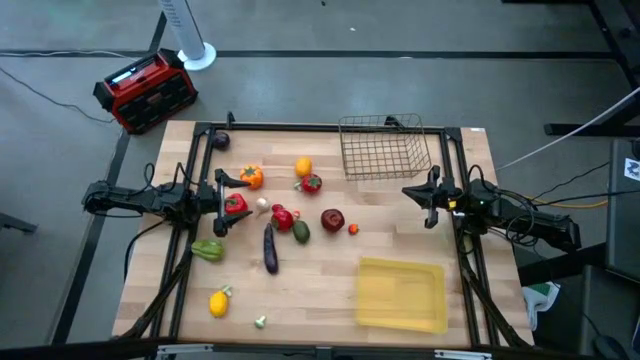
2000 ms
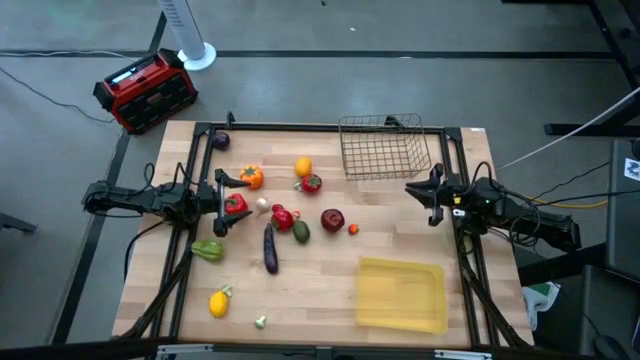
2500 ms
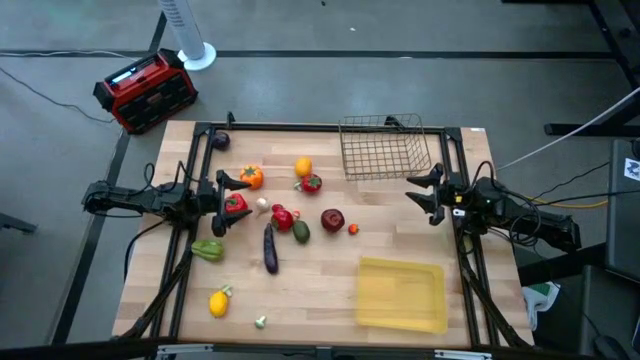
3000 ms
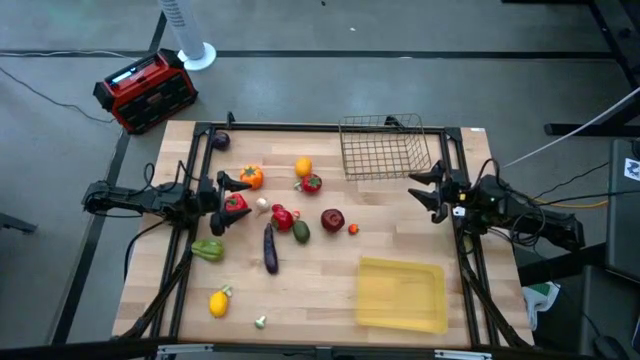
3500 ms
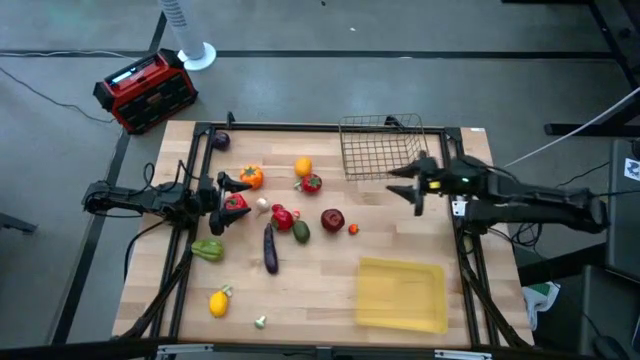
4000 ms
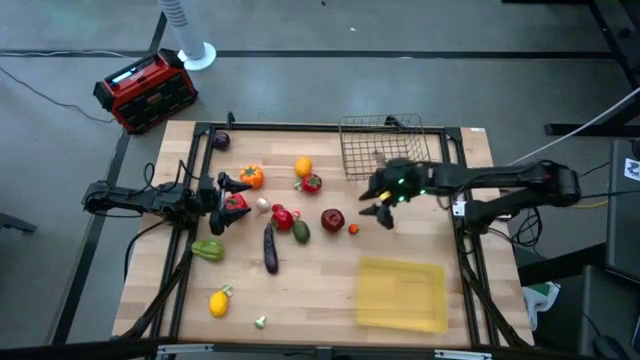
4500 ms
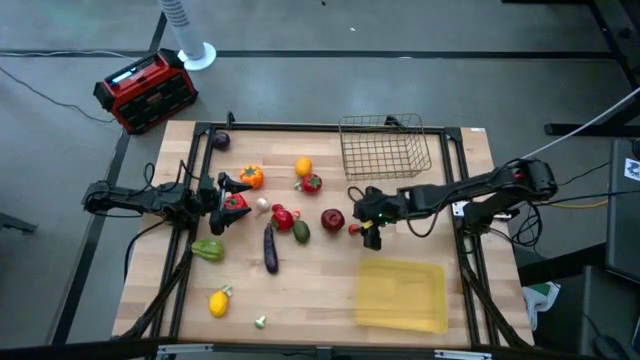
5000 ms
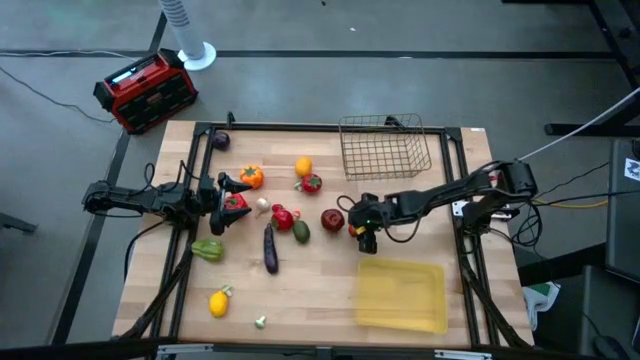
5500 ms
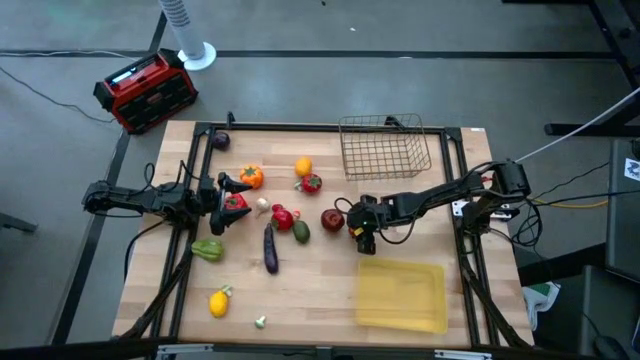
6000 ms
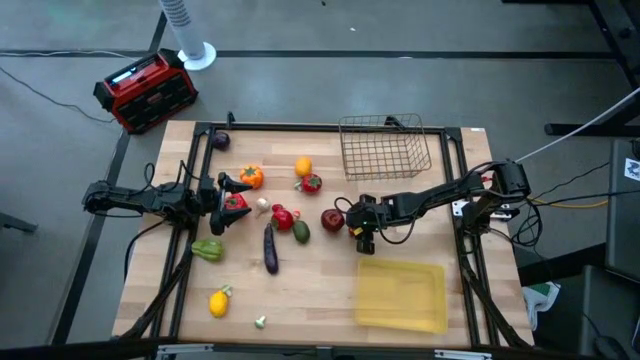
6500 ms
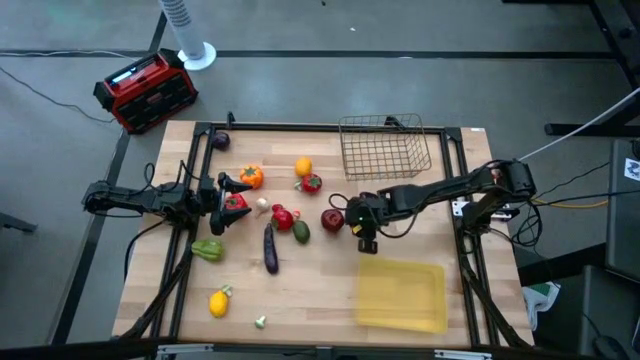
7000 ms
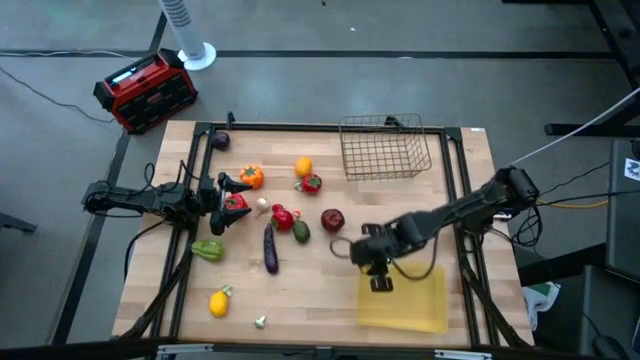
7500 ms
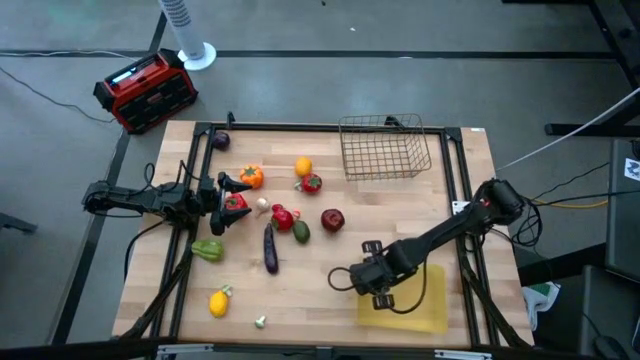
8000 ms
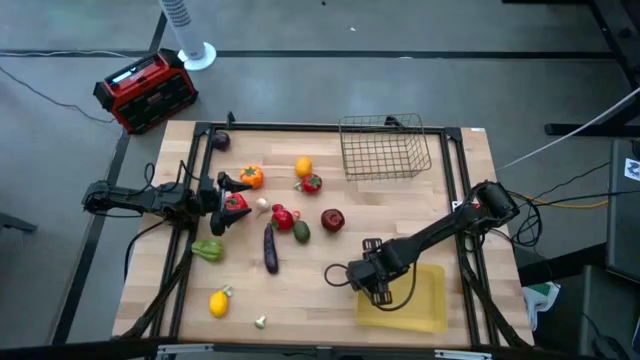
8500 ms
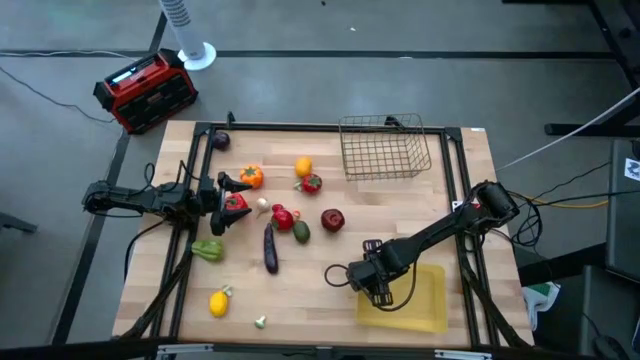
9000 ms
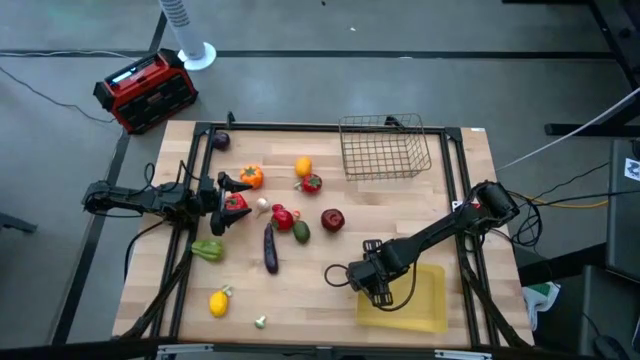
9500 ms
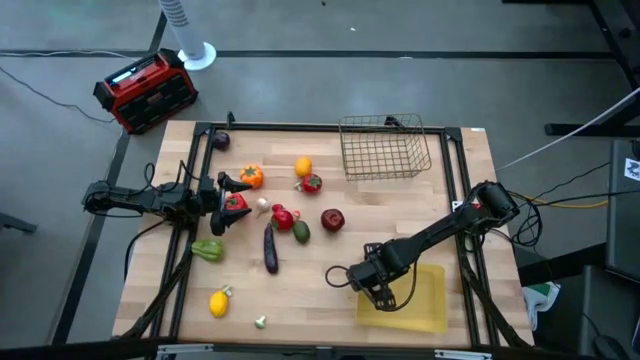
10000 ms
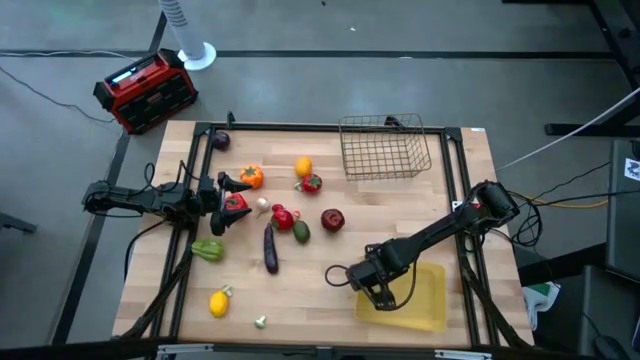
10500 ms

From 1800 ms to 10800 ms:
Task: Sort produce into baskets
Put the small tomato into the yellow bin

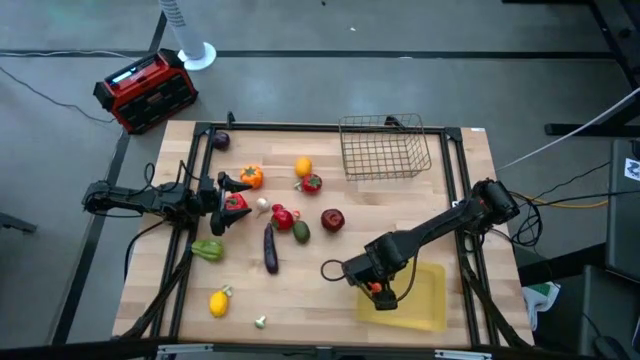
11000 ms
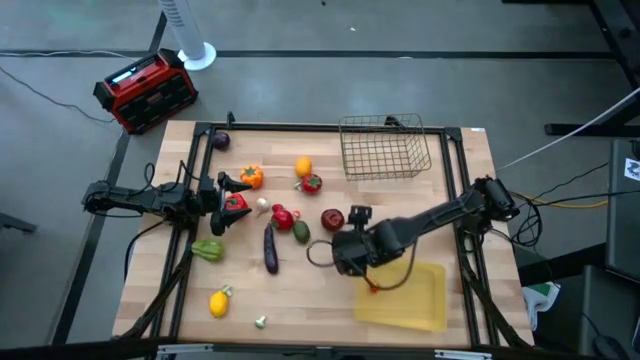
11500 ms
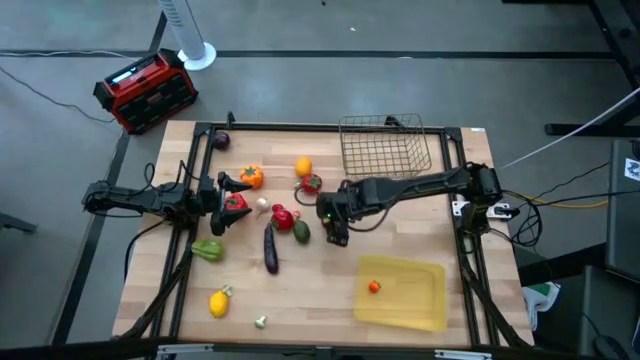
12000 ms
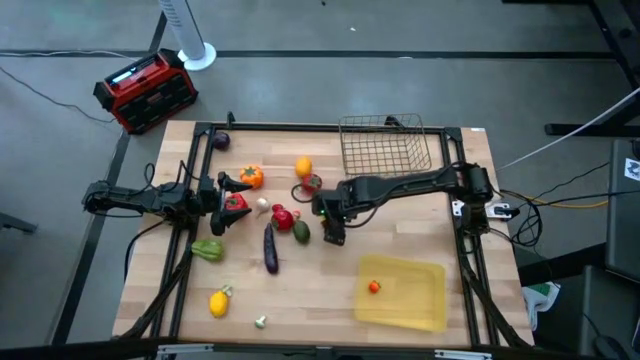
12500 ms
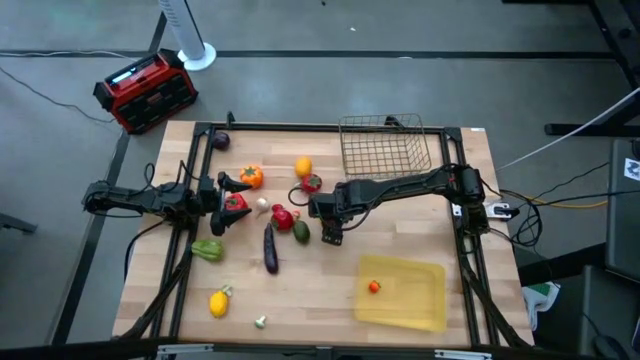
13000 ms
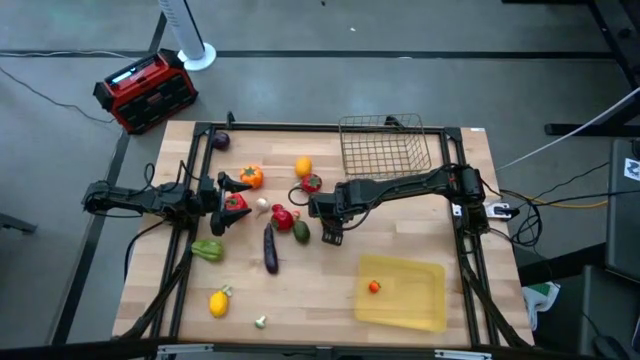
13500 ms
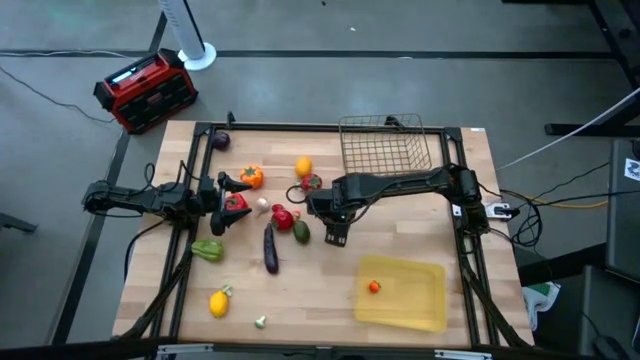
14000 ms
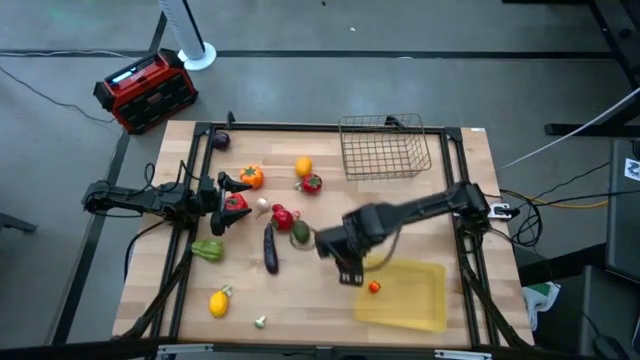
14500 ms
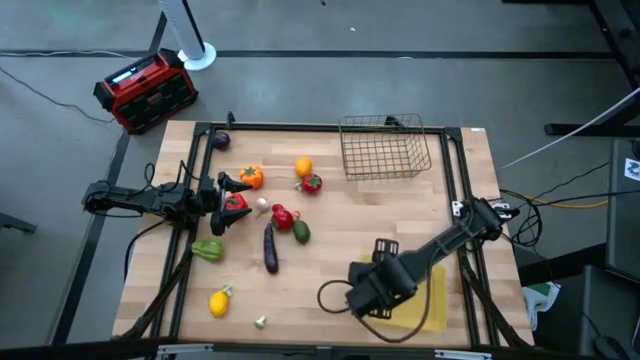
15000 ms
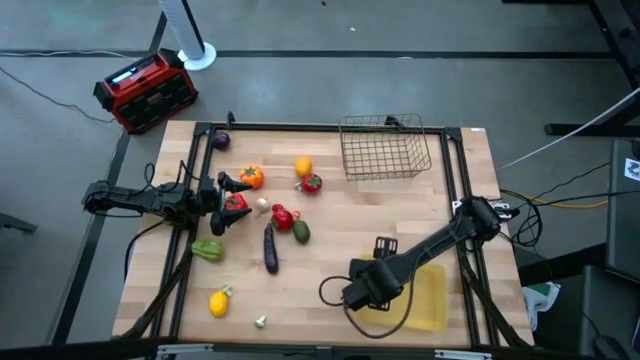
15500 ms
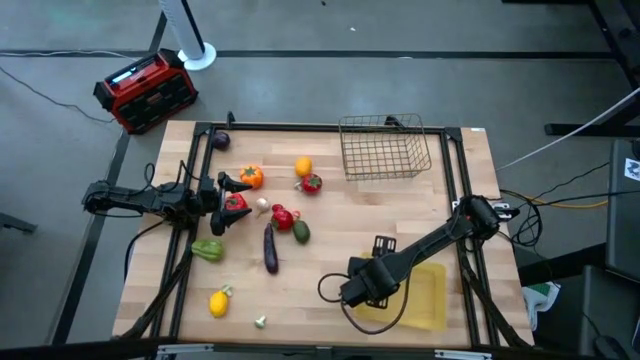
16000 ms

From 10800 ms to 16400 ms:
Put the apple into the yellow bin

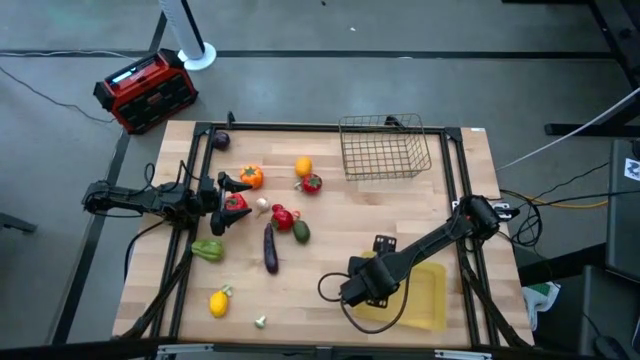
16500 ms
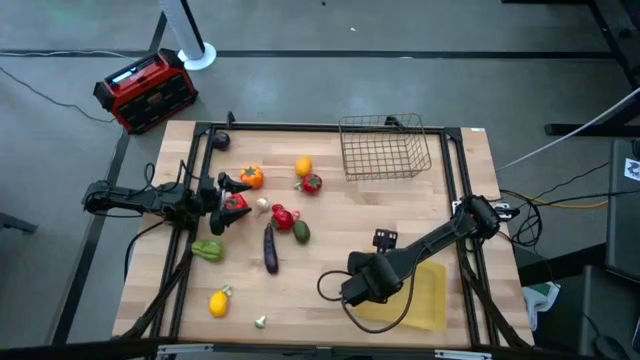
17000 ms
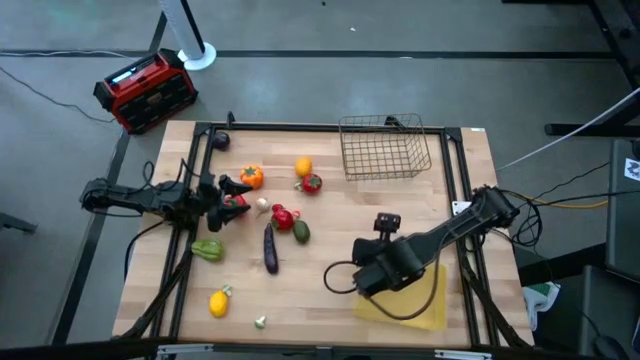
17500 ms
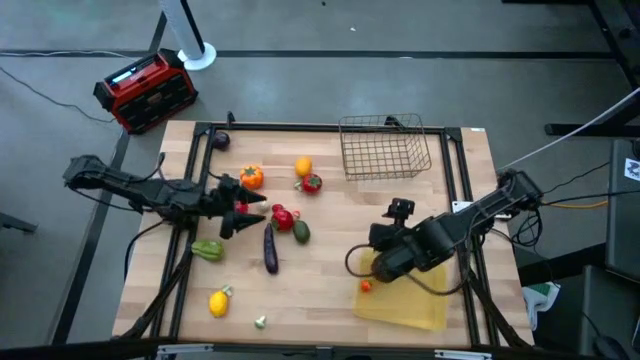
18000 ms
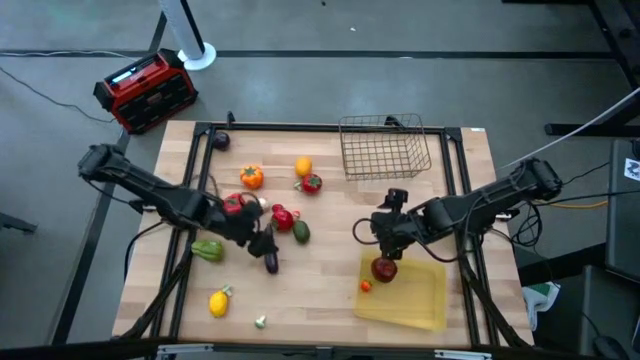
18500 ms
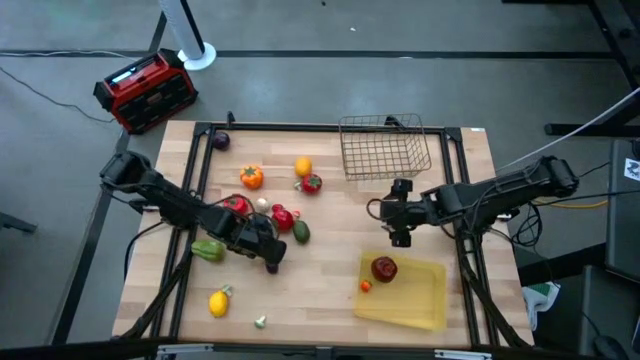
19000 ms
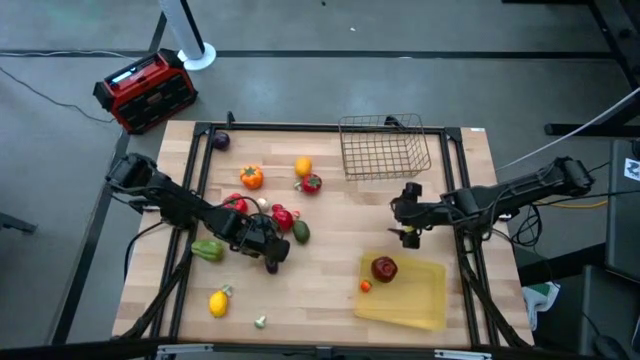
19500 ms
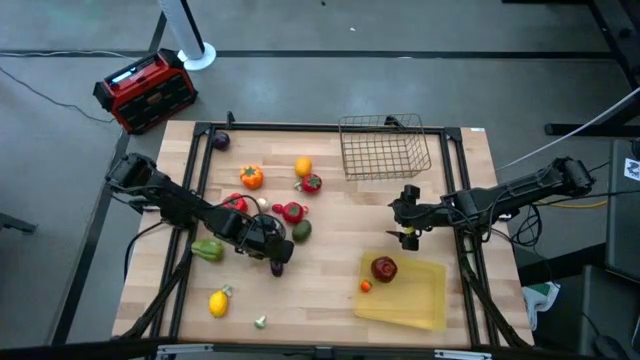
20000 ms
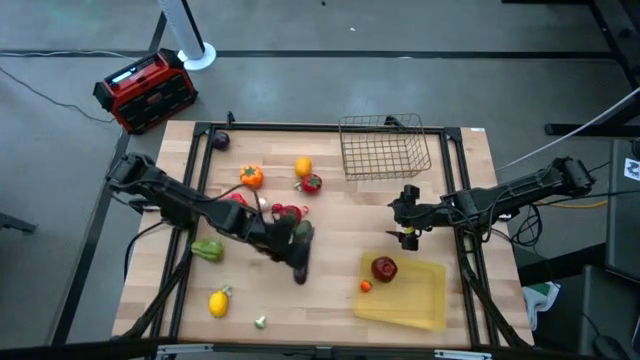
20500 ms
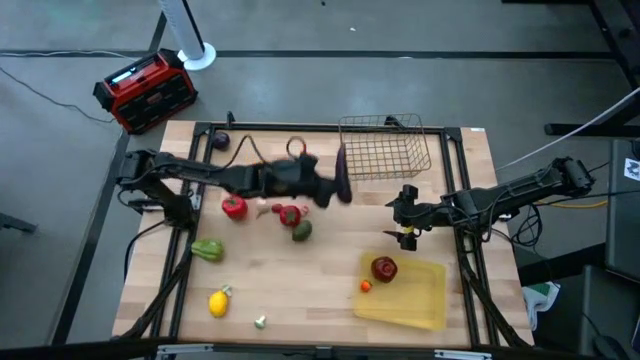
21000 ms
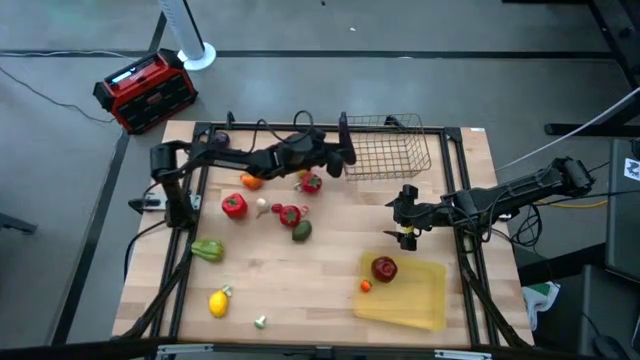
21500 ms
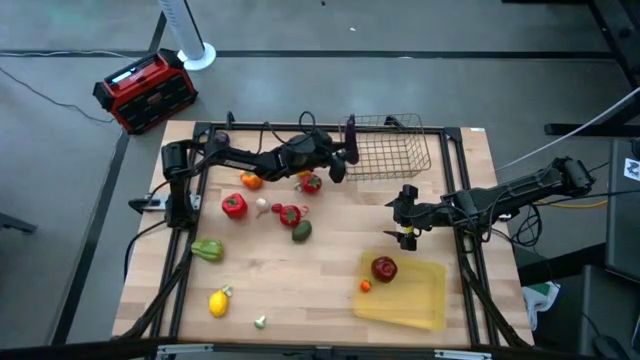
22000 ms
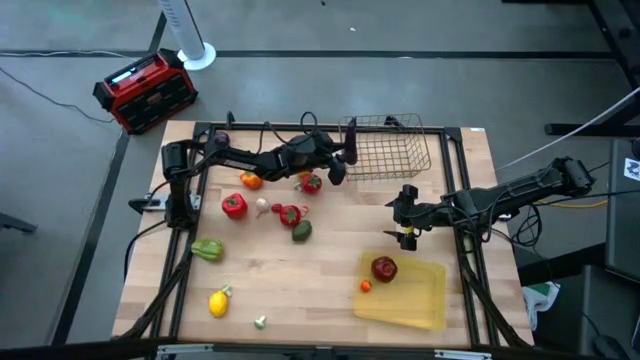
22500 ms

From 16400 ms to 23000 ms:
Put the eggplant into the wire basket
